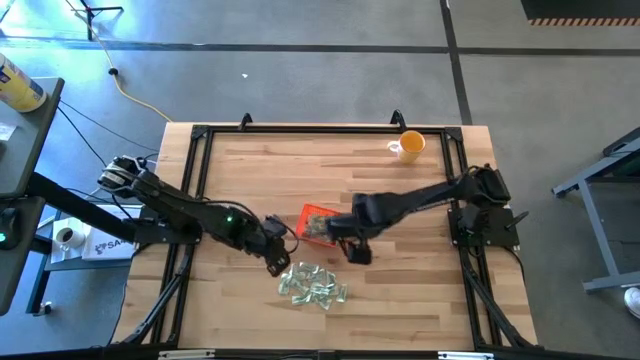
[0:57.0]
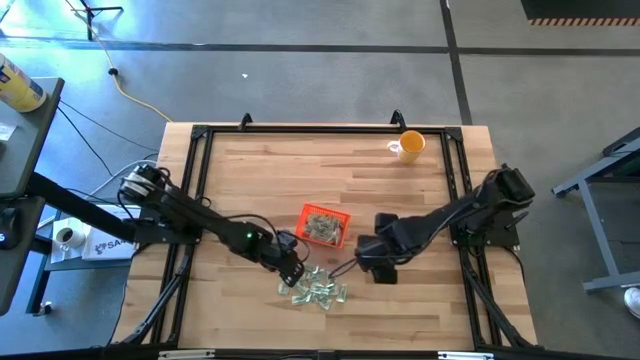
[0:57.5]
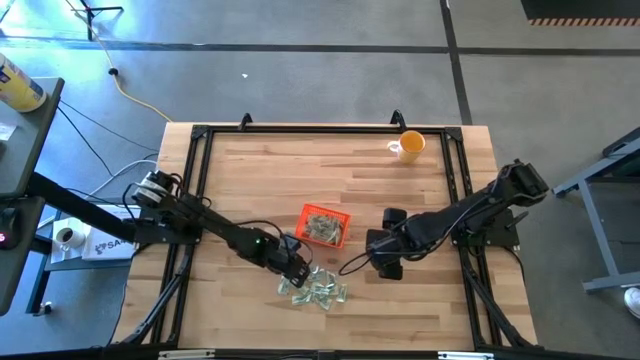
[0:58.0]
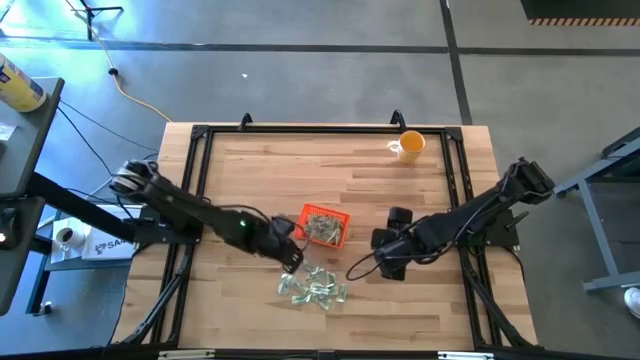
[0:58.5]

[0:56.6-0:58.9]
Task: Pick and place Stevia / Truvia into bins
Put the stevia packet into the orange bin

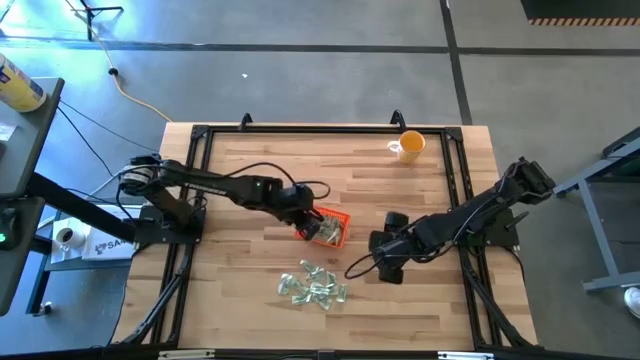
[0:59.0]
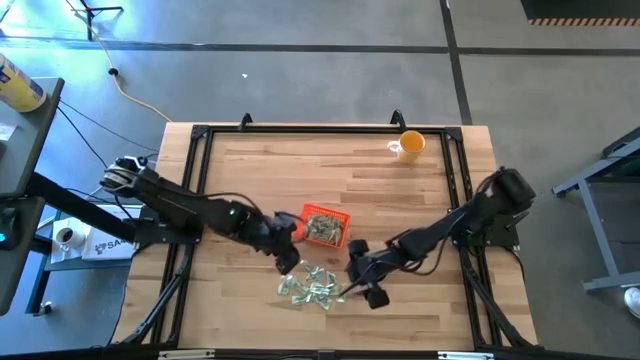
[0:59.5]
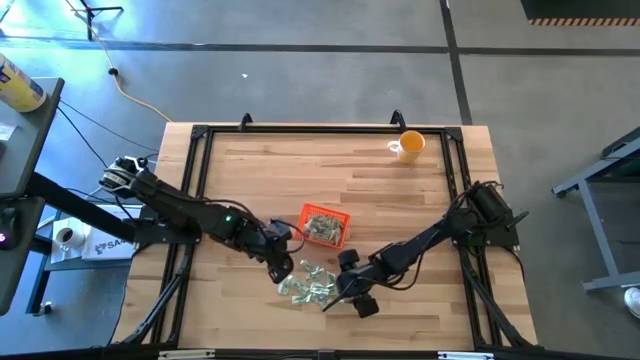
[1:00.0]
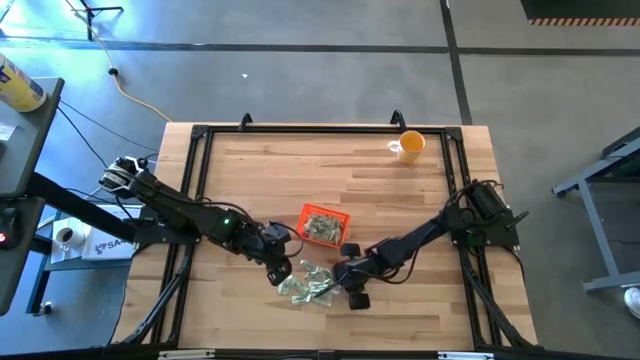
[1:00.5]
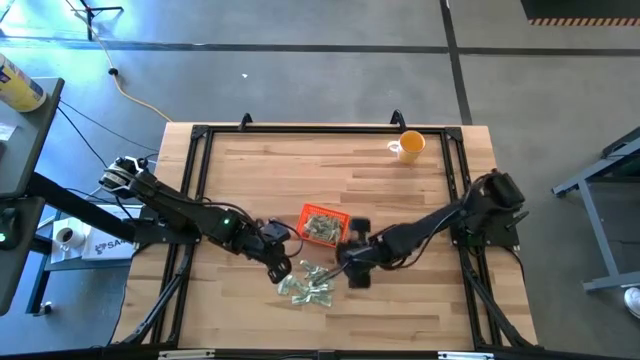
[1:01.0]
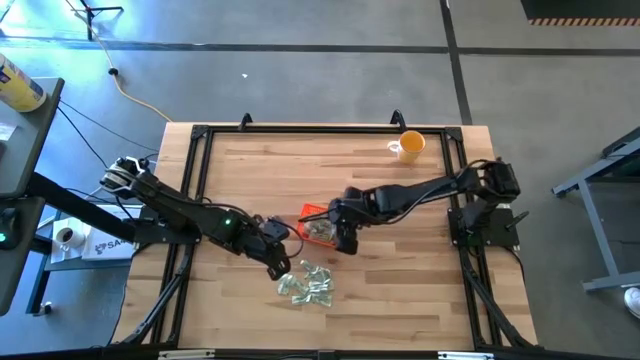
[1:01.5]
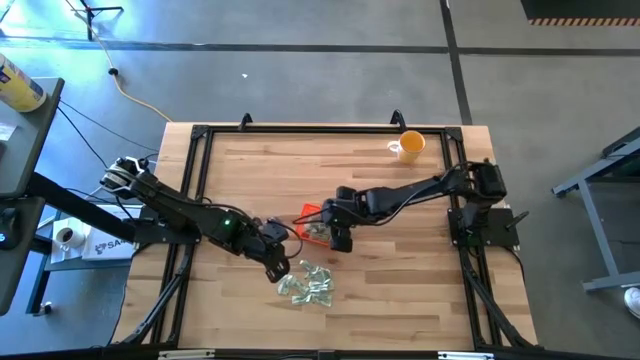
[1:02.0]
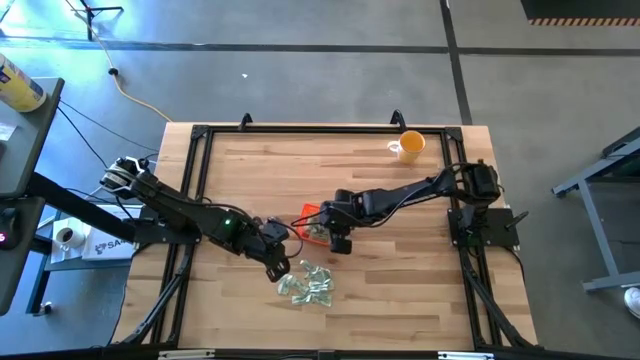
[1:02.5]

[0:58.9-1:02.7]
Put the stevia packet into the orange bin

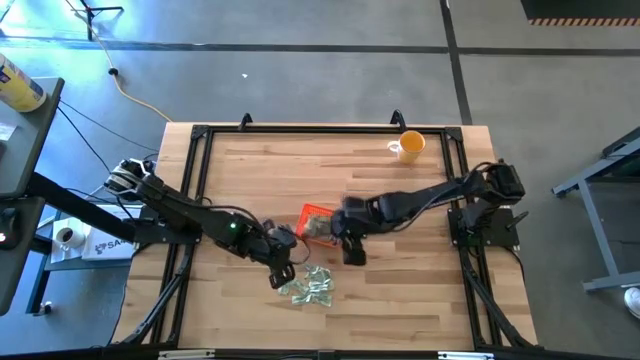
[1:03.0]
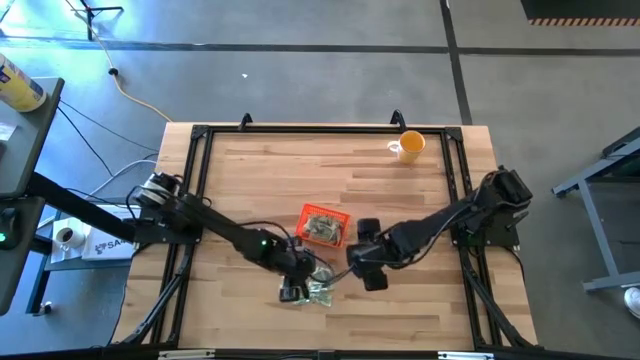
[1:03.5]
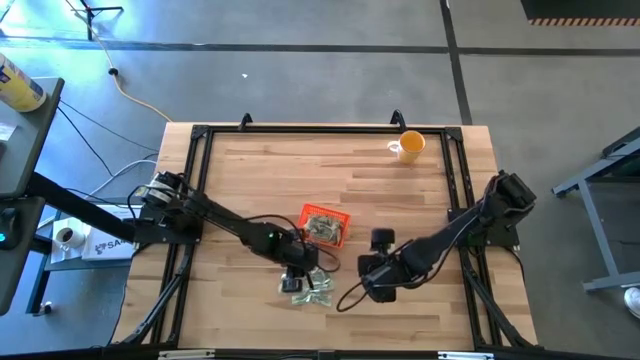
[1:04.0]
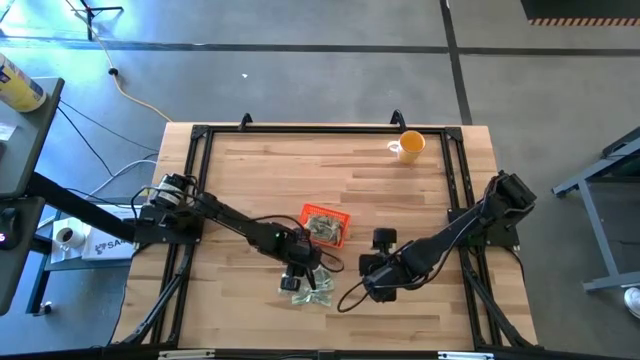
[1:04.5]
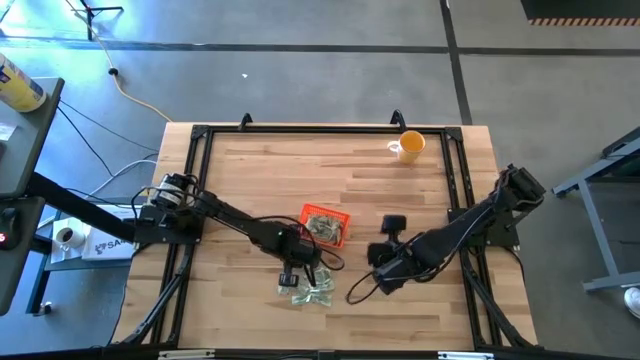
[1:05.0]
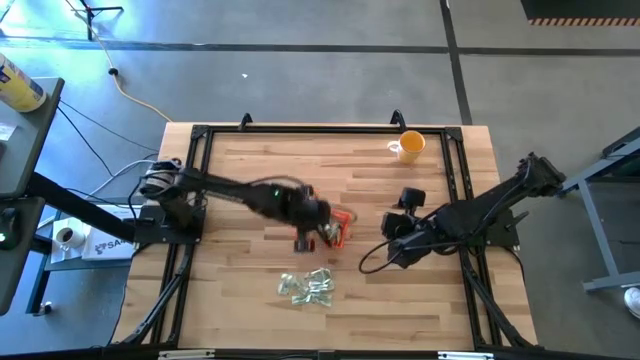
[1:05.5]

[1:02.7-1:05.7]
Put the stevia packet into the orange bin

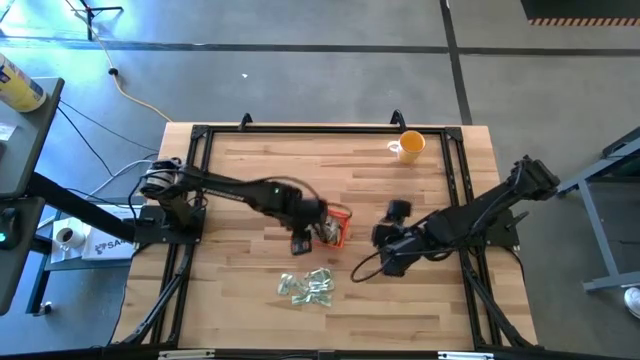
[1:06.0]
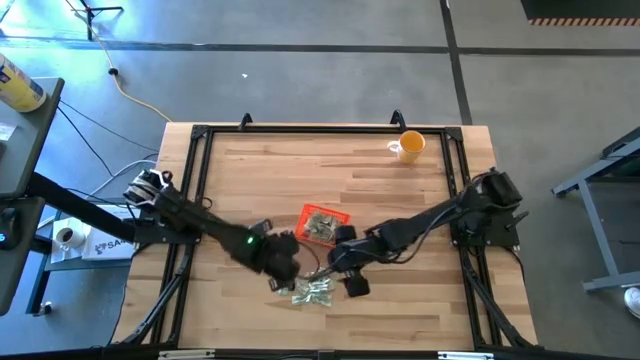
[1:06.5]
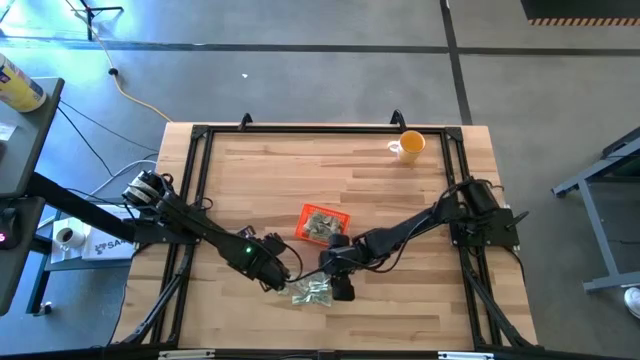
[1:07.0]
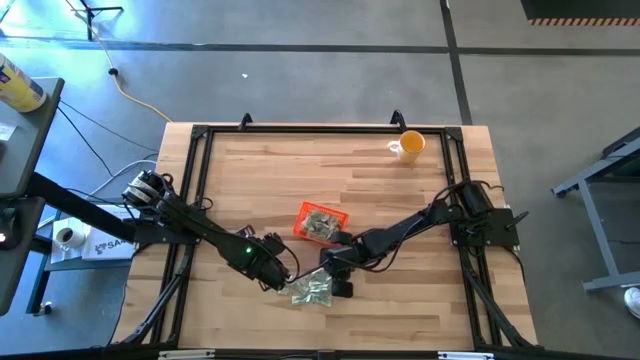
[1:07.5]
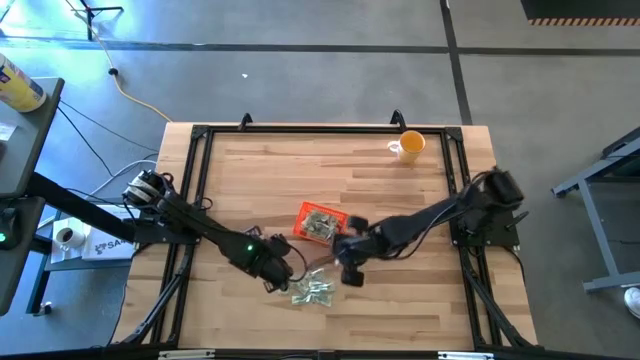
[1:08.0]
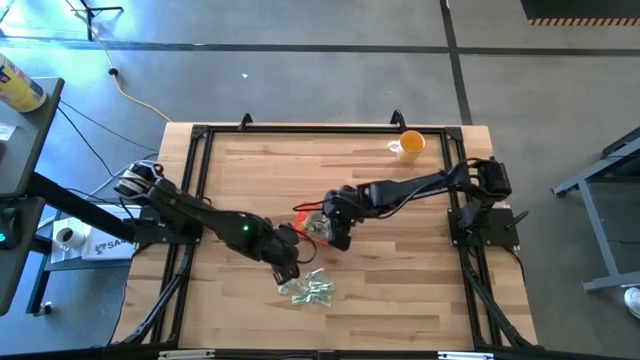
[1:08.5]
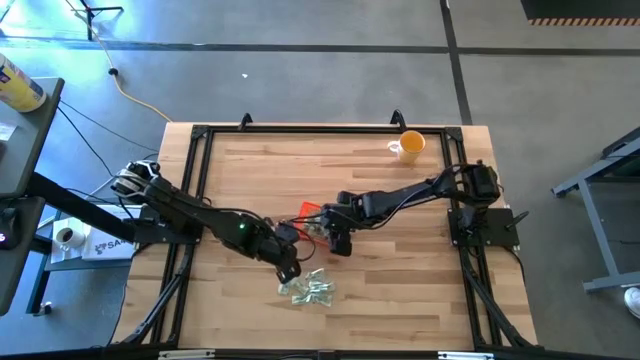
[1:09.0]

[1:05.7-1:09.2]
Put the stevia packet into the orange bin

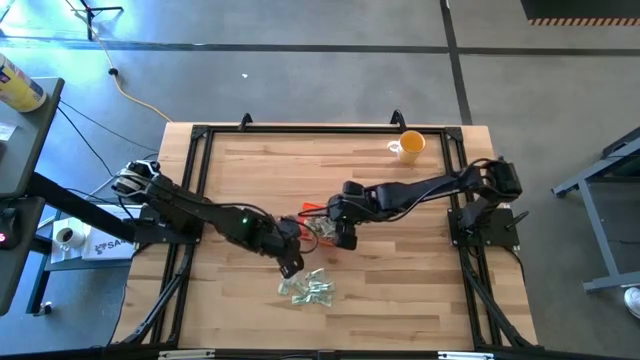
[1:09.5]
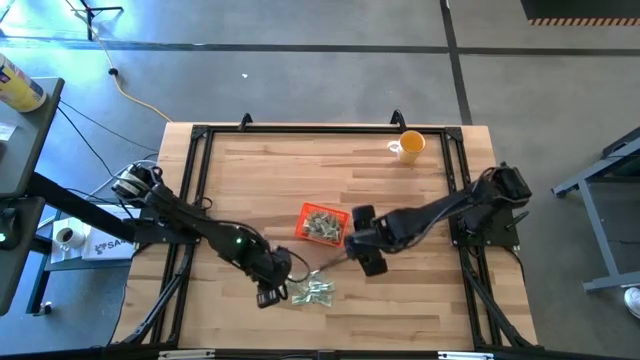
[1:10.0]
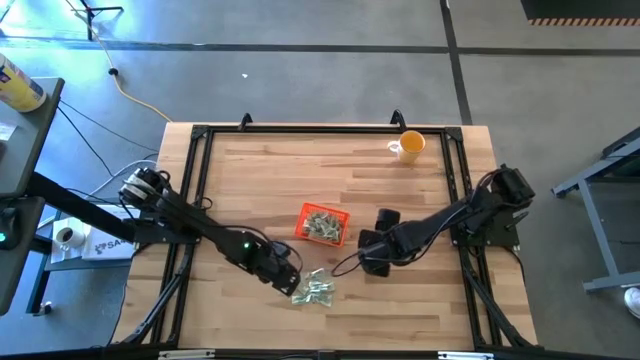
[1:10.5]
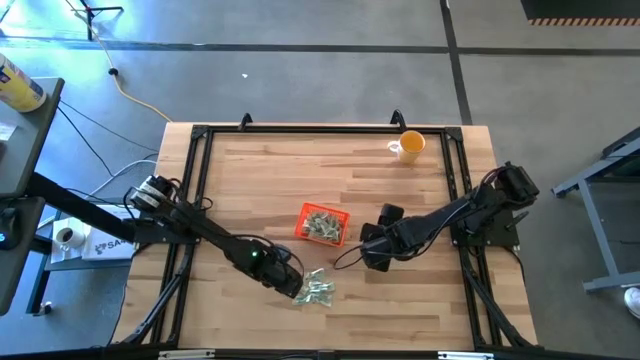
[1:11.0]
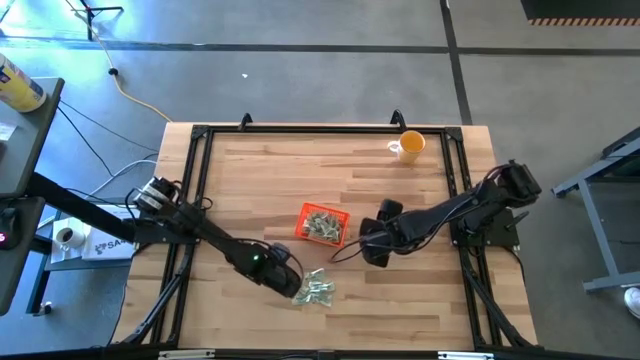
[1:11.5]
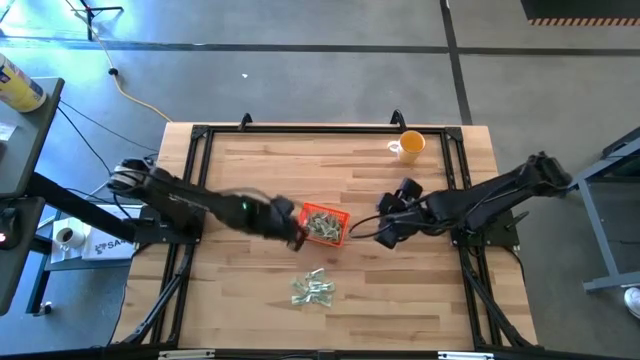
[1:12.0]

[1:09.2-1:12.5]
Put the stevia packet into the orange bin

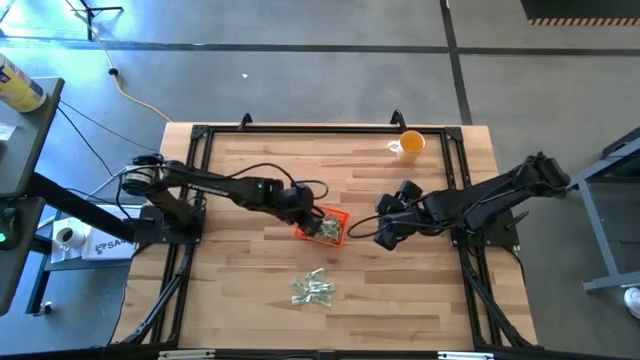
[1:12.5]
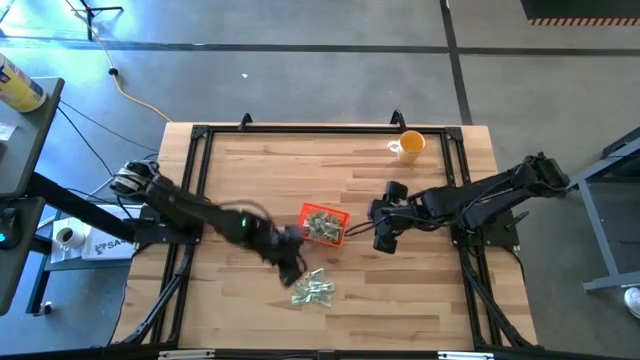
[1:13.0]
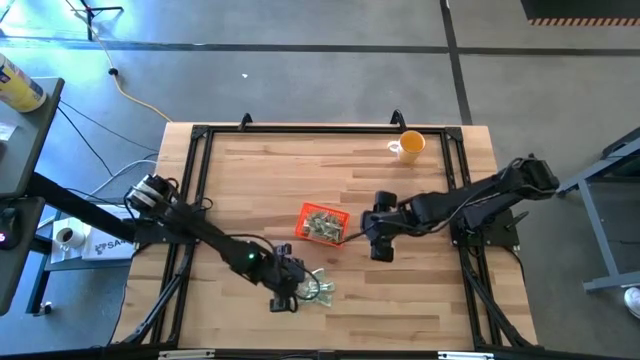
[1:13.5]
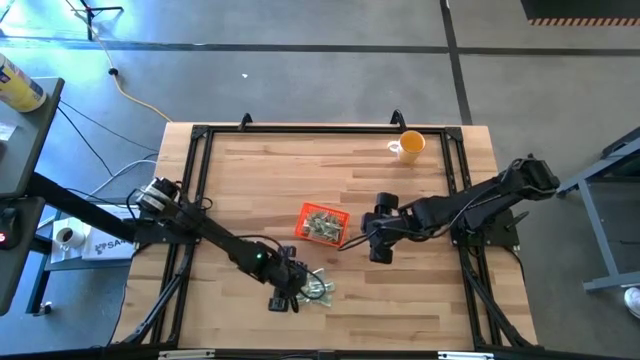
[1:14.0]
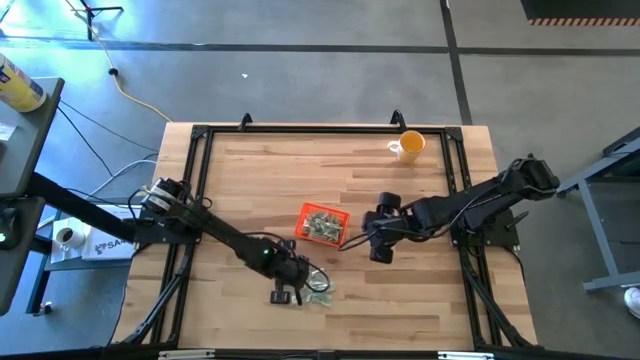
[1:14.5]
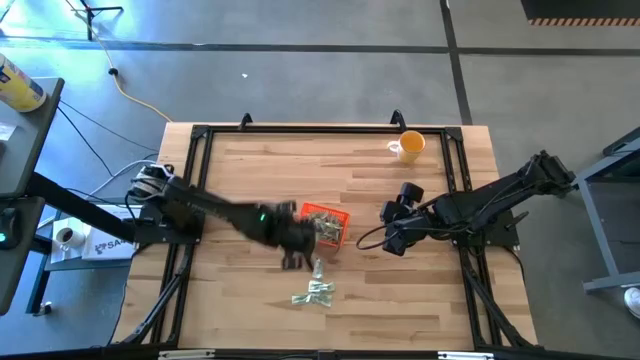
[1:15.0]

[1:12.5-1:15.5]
Put the stevia packet into the orange bin

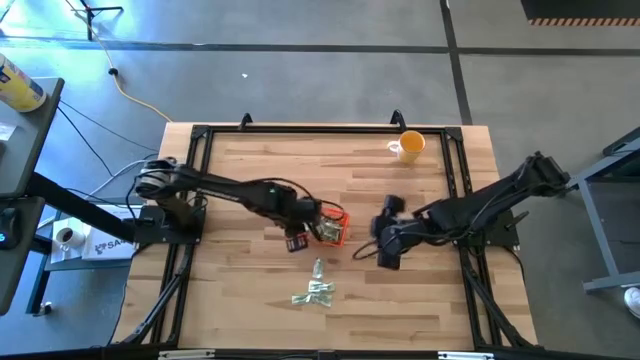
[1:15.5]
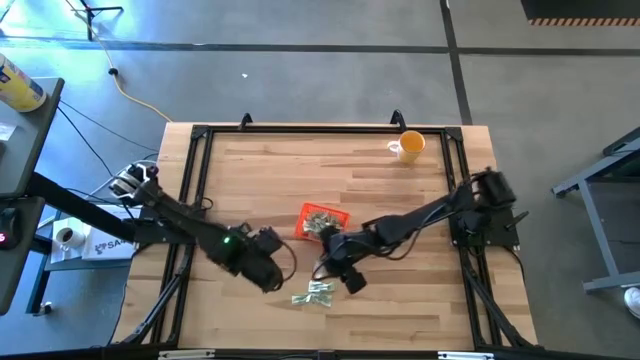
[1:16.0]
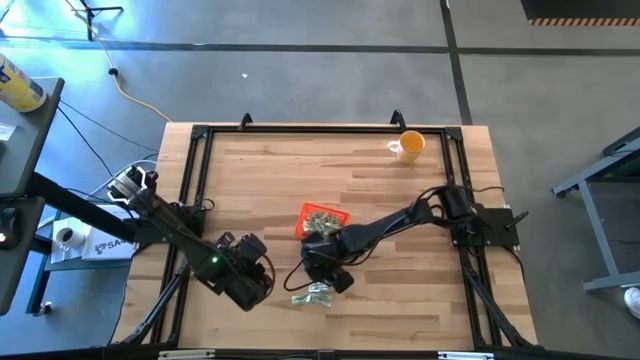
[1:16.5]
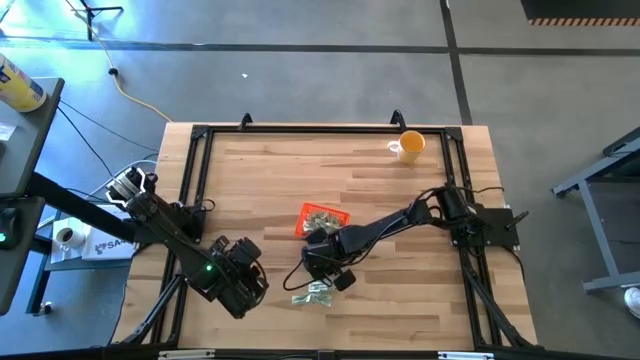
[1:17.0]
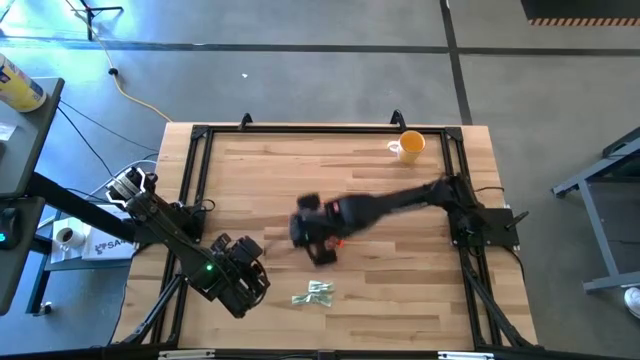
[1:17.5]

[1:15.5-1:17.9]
Put the stevia packet into the orange bin

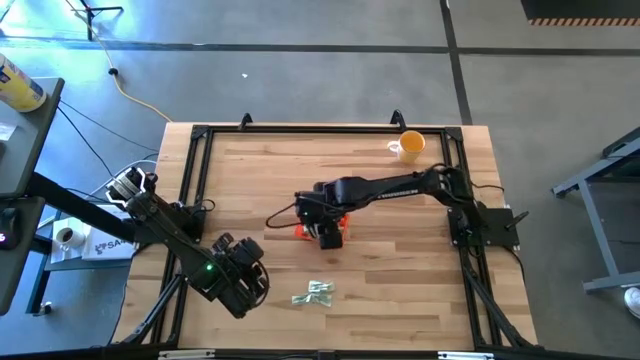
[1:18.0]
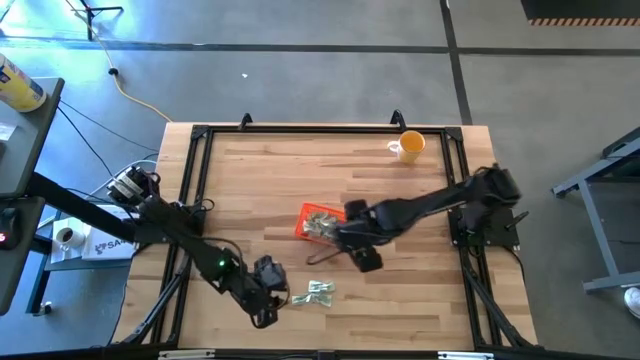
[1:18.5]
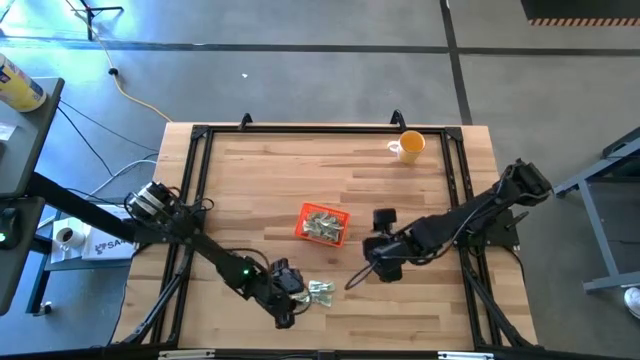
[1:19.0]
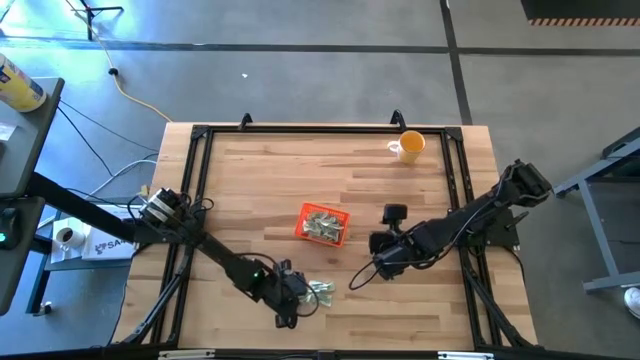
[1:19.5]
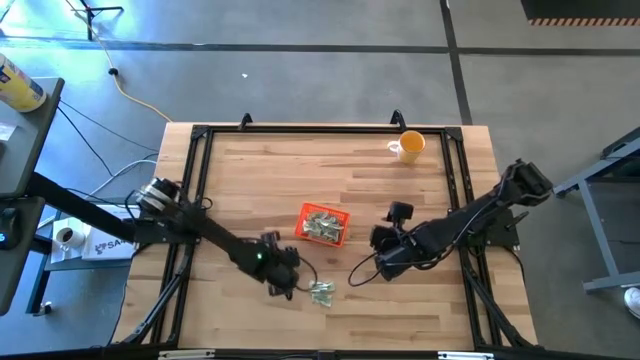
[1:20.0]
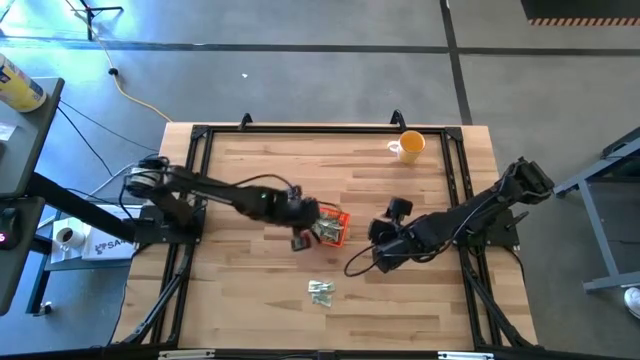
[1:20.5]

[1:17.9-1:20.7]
Put the stevia packet into the orange bin
